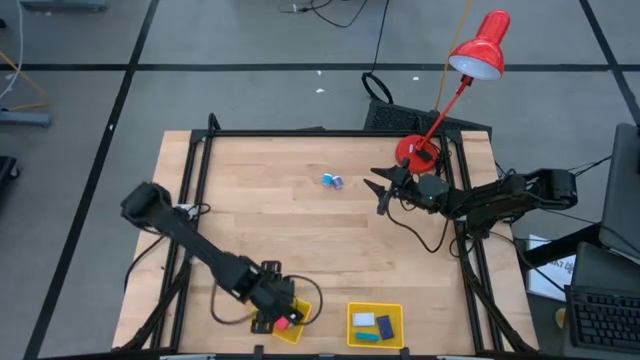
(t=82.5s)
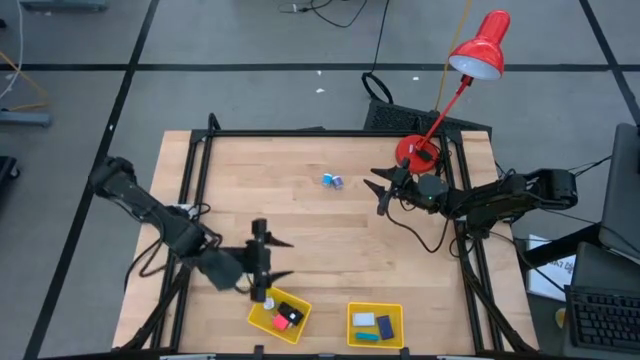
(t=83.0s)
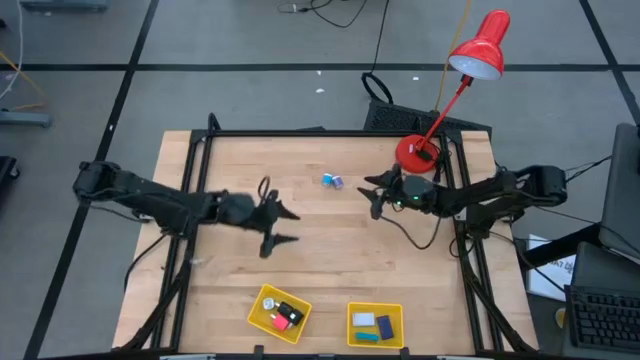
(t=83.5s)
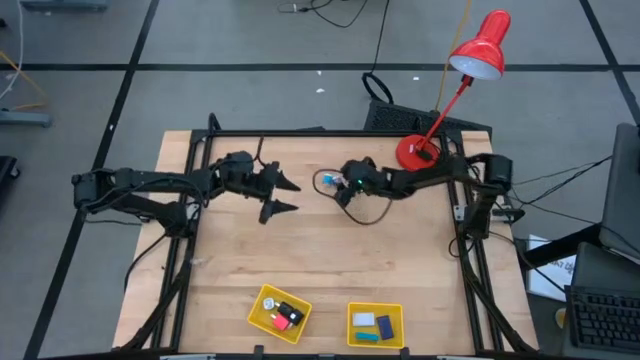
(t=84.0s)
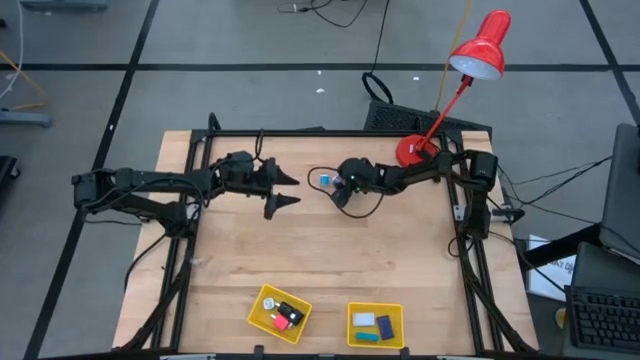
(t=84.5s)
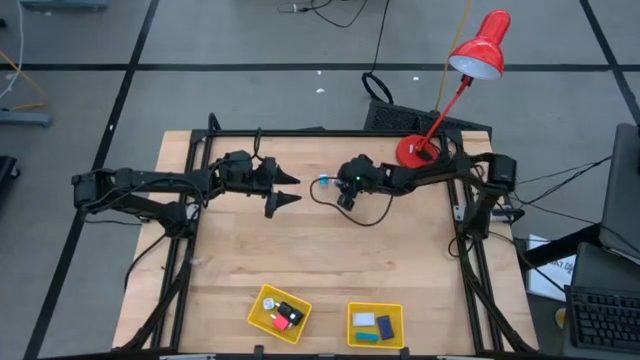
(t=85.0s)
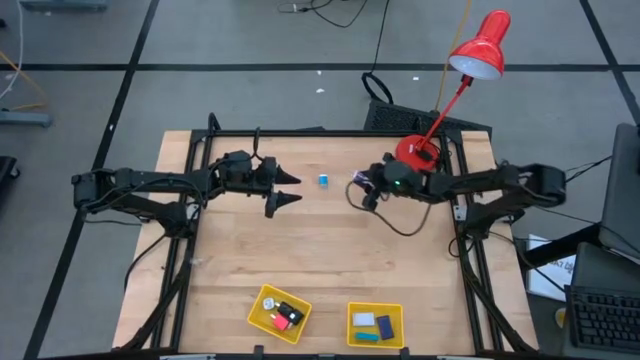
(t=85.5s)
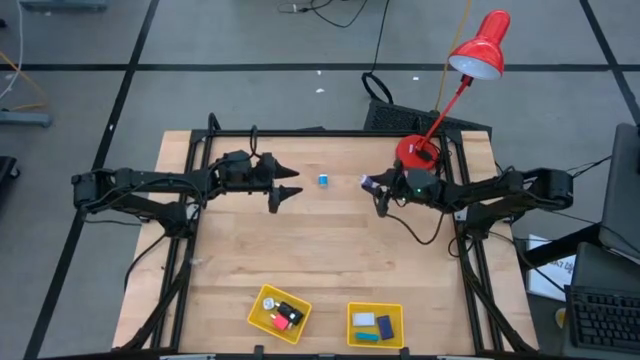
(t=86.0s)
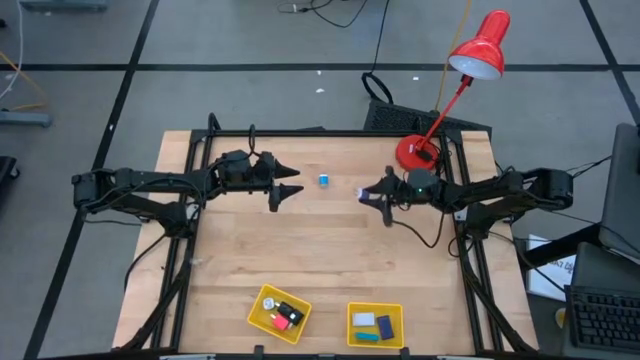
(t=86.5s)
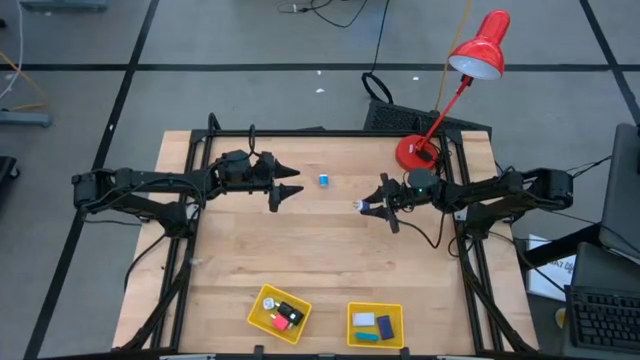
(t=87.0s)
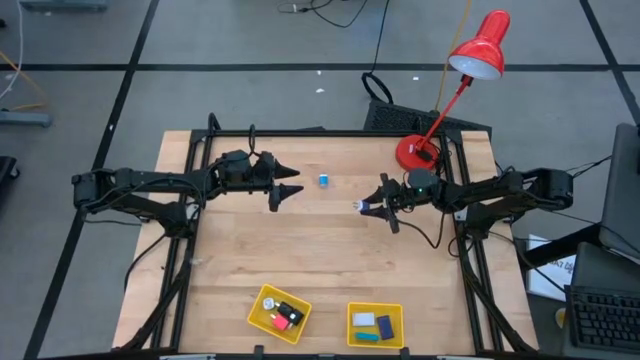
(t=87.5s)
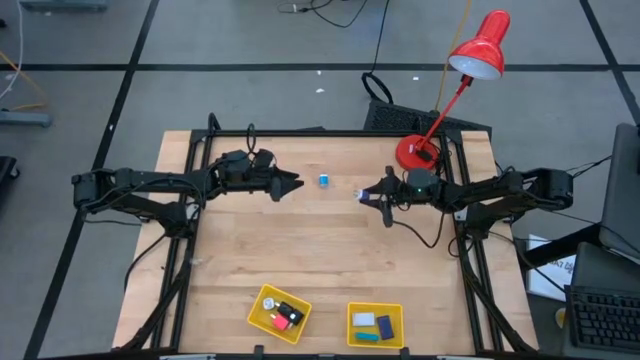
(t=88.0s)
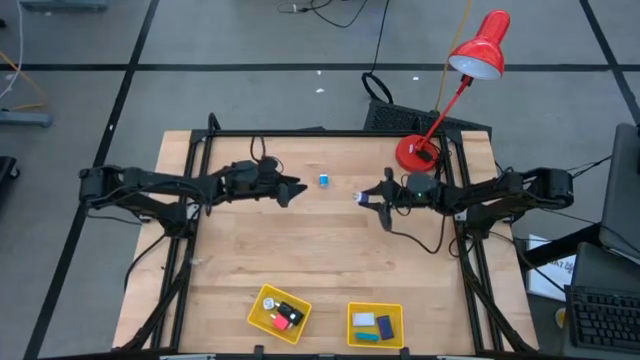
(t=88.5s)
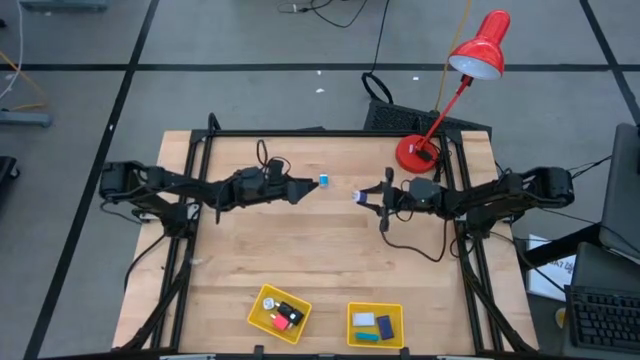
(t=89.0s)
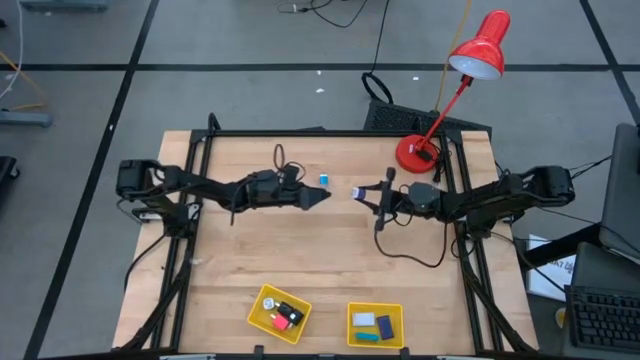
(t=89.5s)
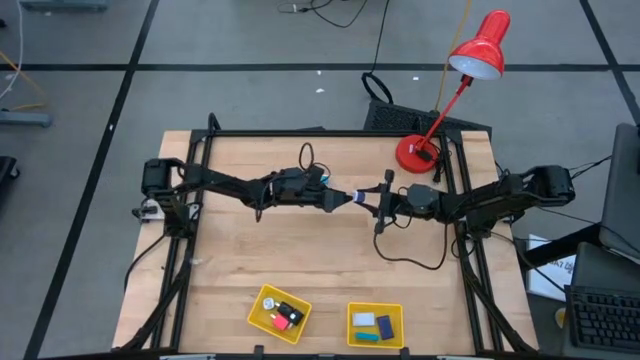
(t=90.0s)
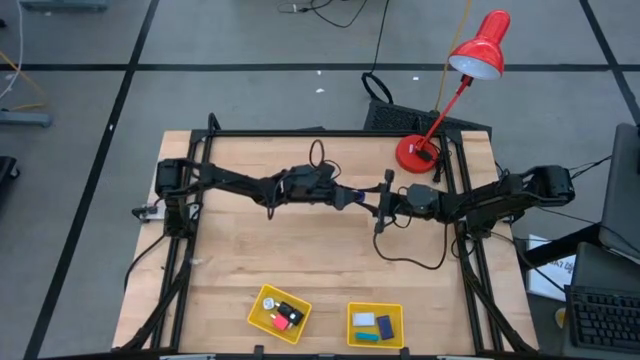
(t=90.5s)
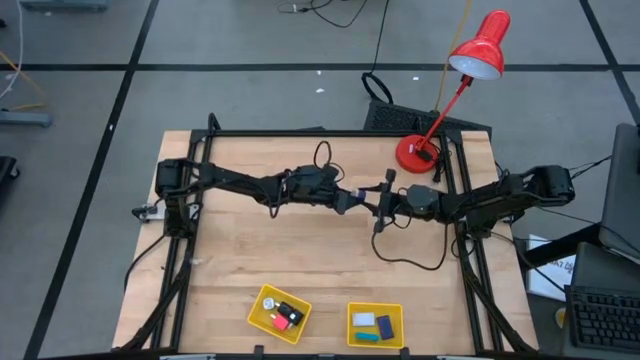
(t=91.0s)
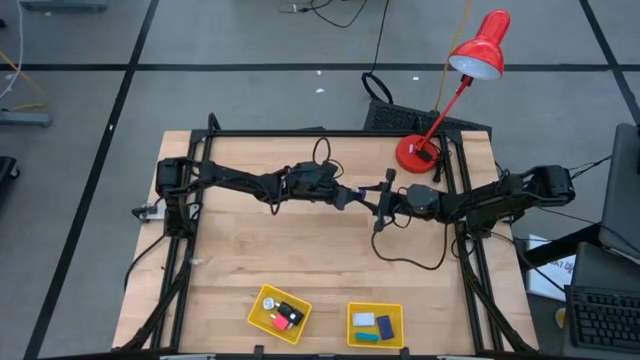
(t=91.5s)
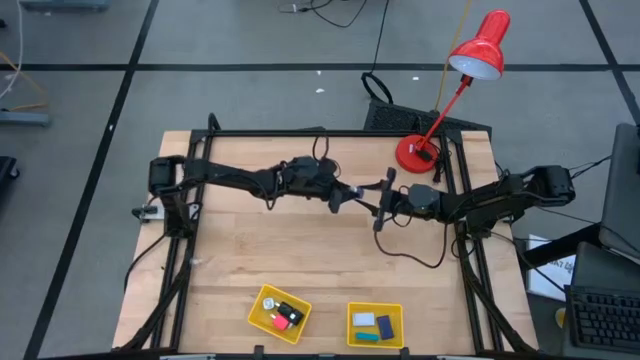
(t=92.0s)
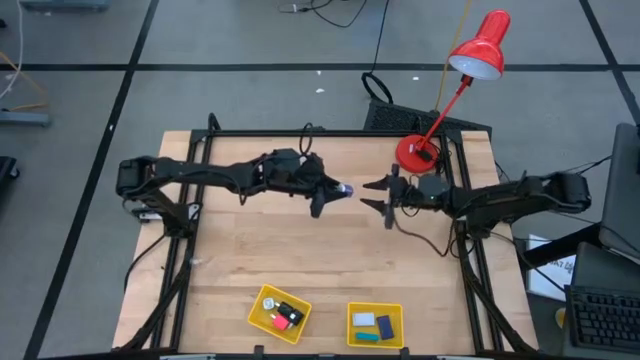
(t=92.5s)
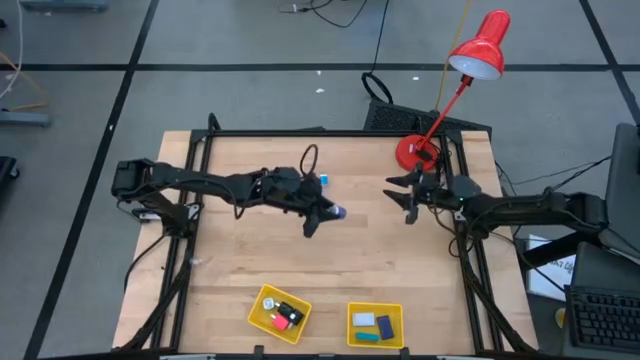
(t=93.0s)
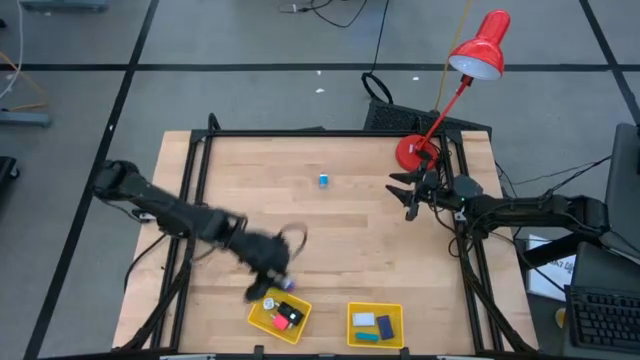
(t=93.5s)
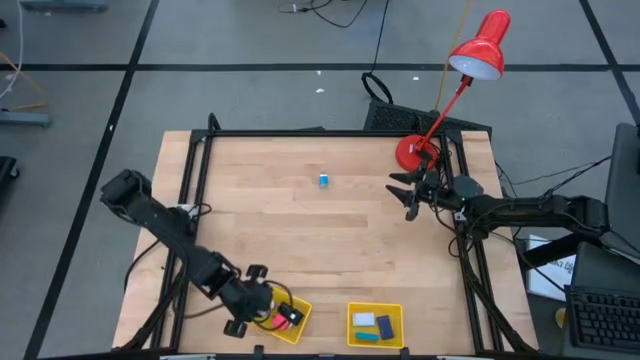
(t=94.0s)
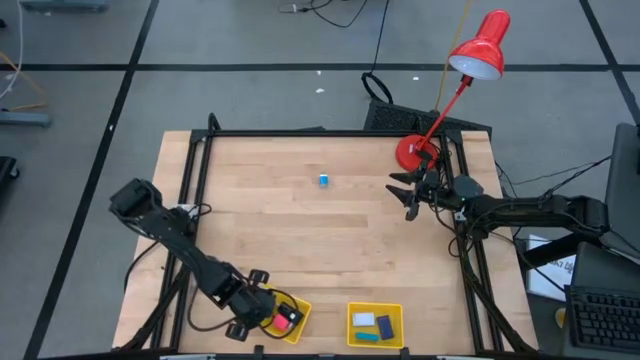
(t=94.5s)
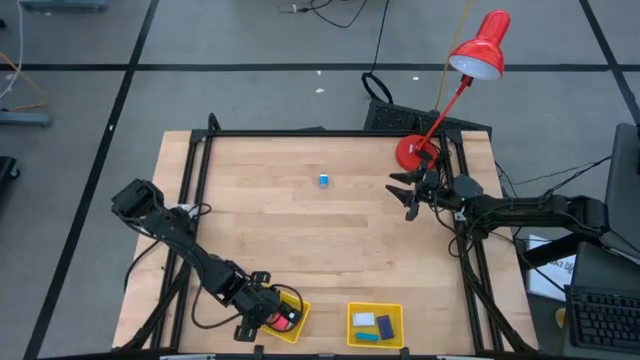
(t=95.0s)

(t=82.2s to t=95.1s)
Task: Pick & Place Office items
Put the purple adapter into the left yellow bin

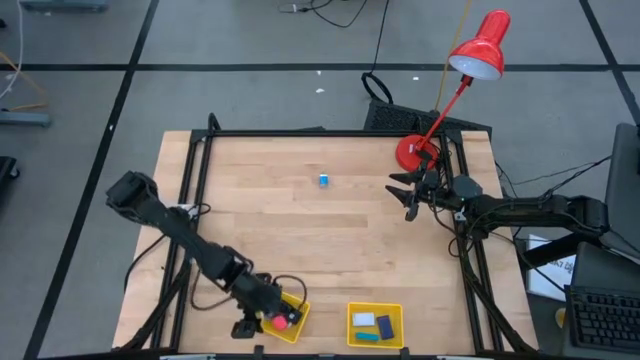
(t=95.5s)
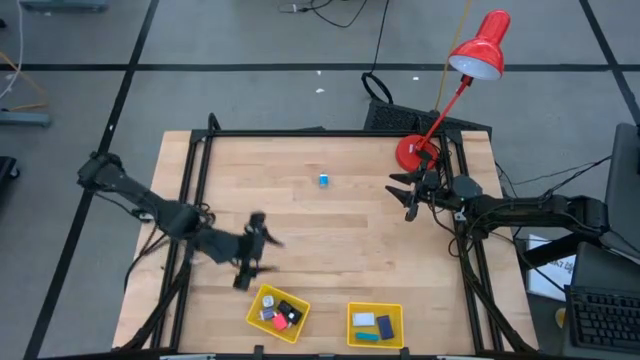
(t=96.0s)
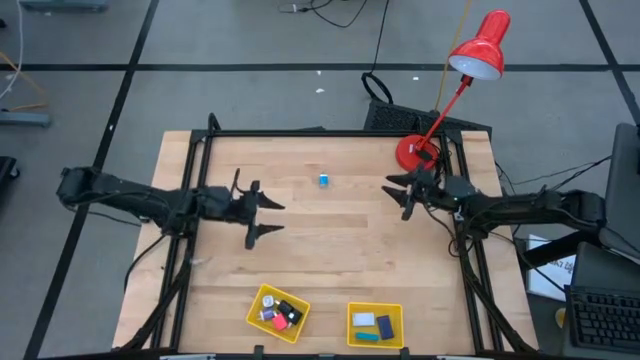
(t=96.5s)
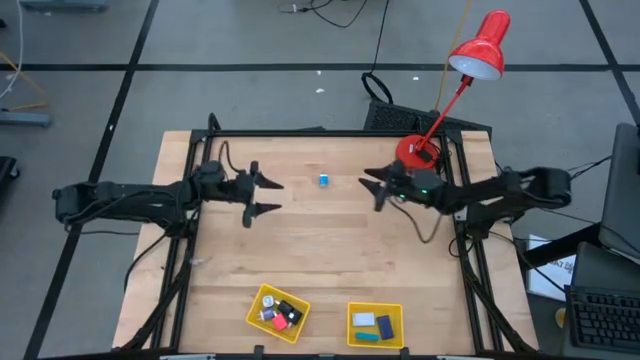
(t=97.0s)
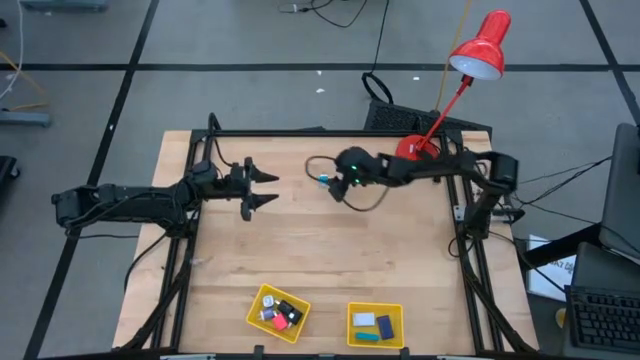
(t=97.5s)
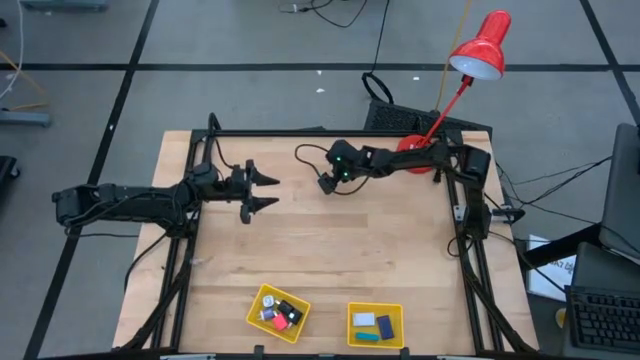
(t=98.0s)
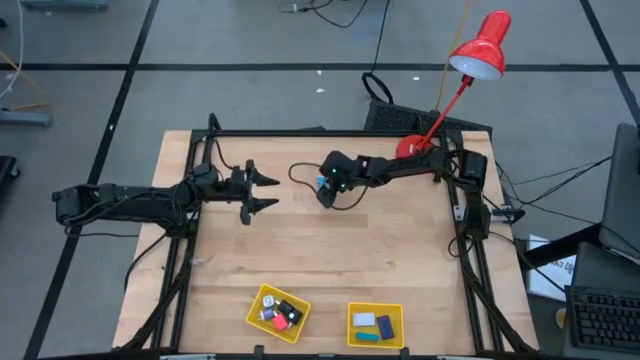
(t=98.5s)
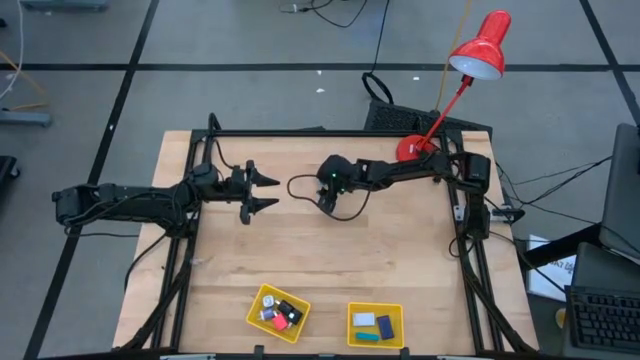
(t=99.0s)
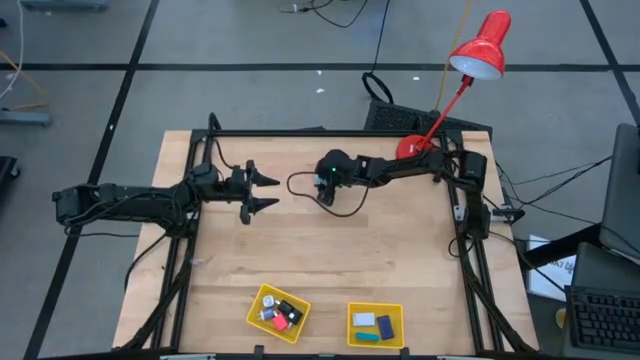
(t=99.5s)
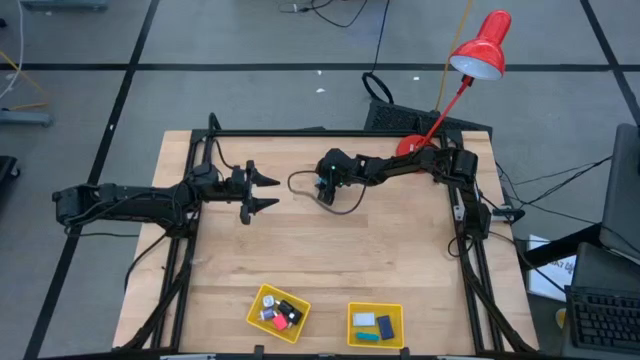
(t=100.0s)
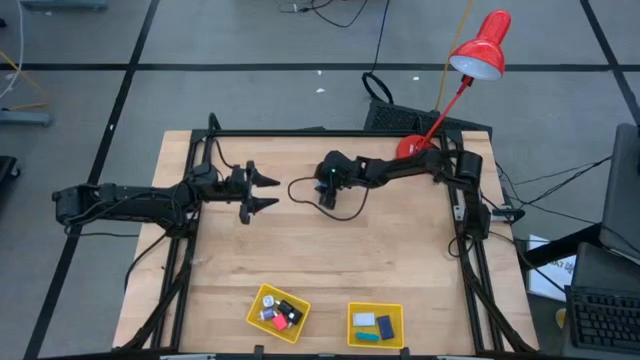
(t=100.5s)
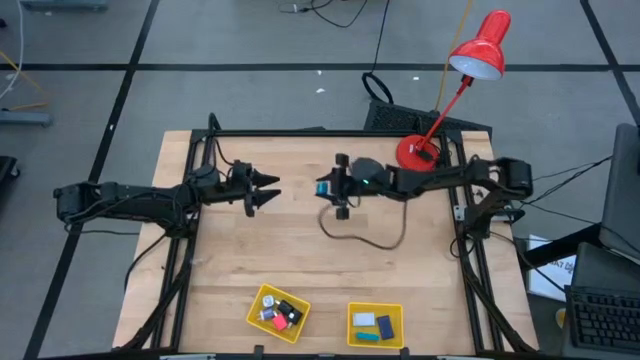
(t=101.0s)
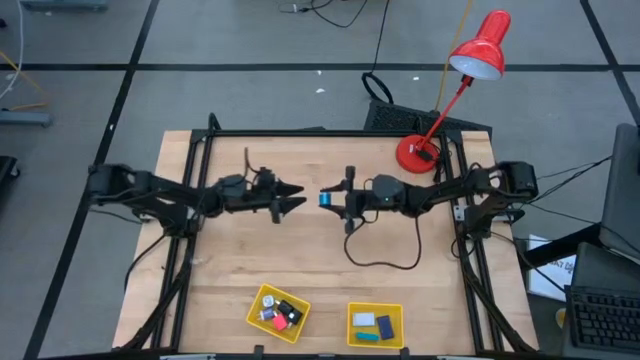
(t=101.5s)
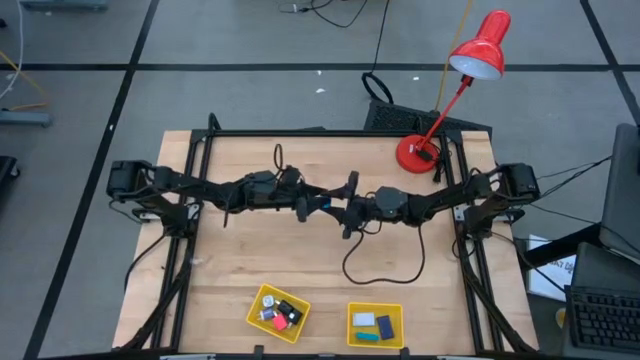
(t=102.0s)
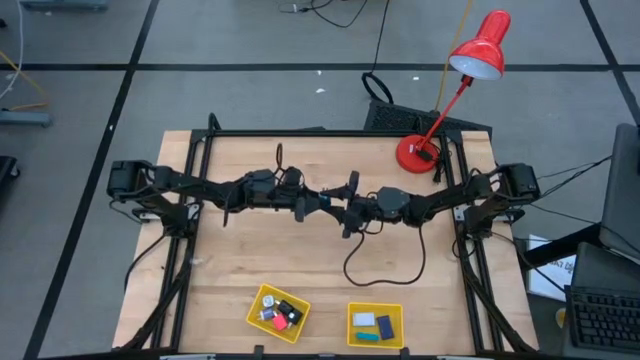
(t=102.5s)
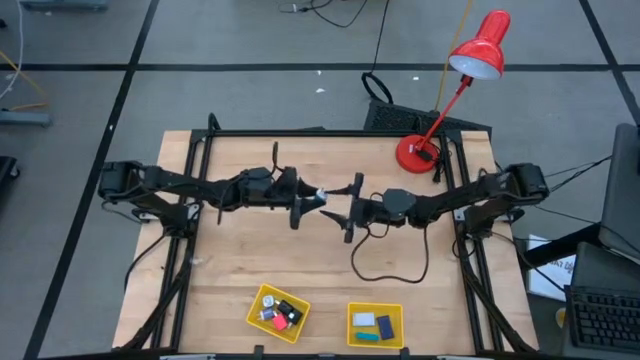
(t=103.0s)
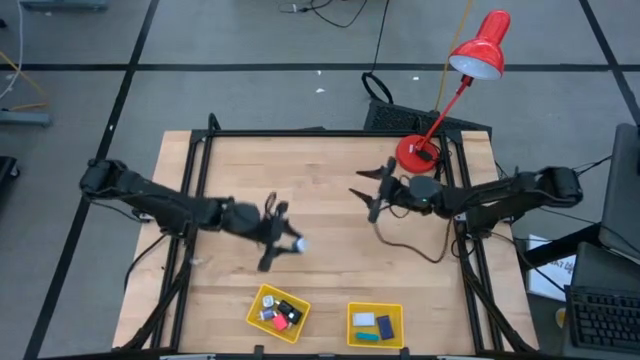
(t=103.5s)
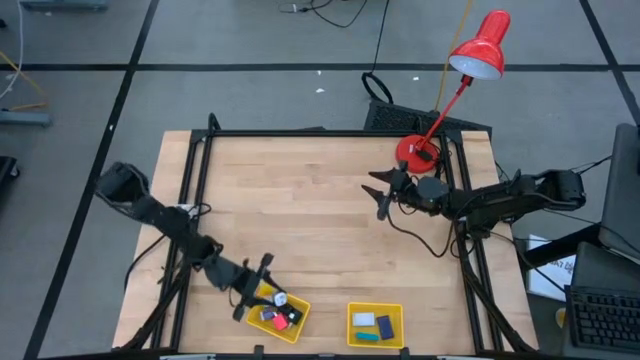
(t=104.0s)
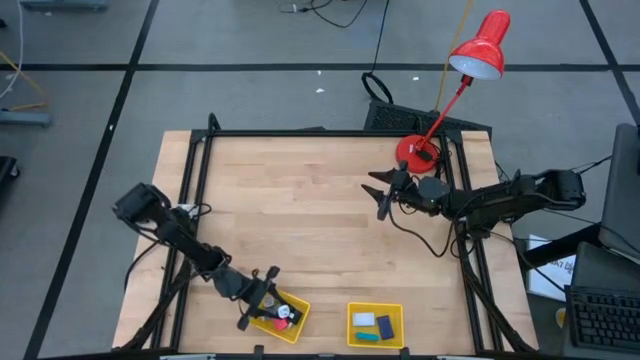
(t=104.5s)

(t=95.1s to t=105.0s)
Put the blue adapter into the left yellow bin
